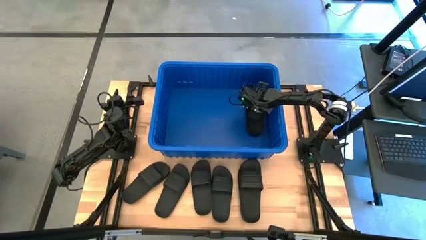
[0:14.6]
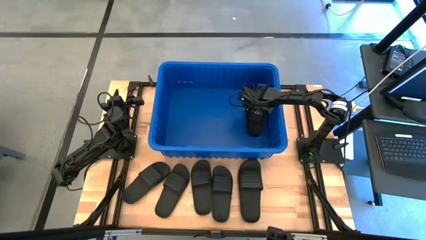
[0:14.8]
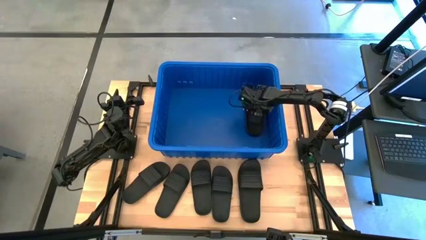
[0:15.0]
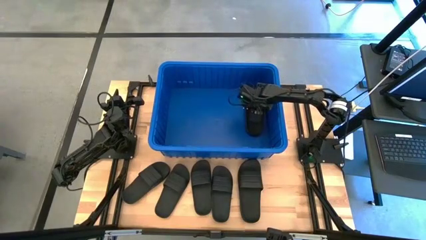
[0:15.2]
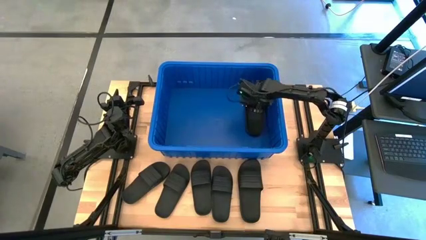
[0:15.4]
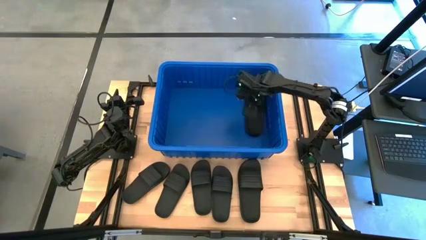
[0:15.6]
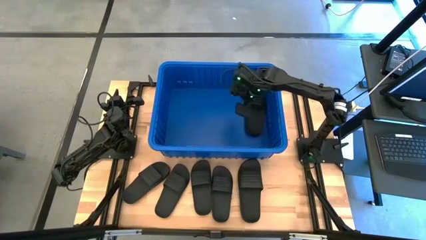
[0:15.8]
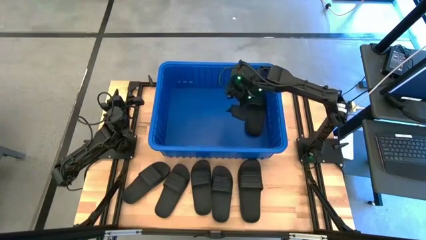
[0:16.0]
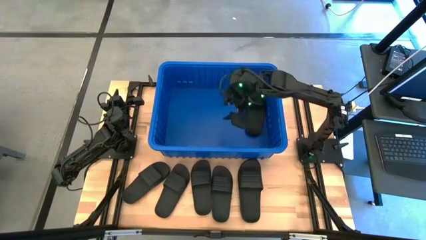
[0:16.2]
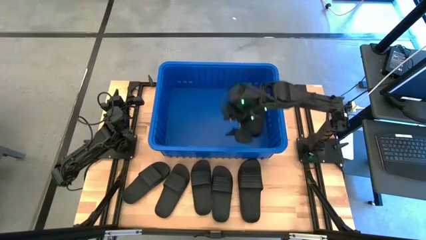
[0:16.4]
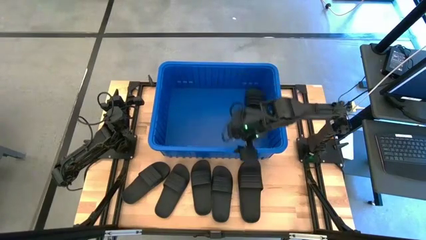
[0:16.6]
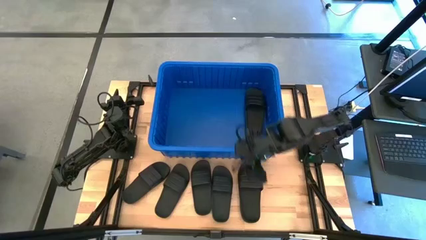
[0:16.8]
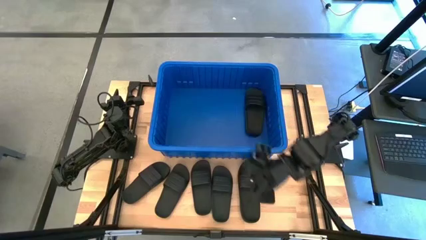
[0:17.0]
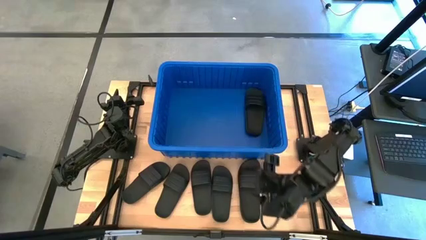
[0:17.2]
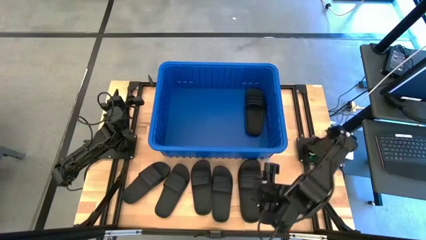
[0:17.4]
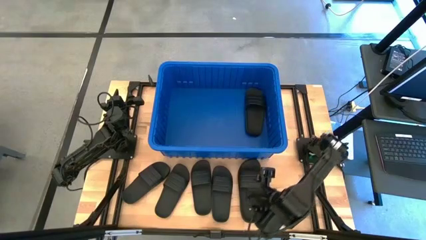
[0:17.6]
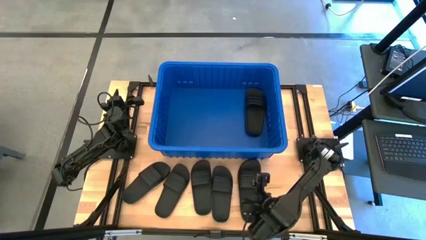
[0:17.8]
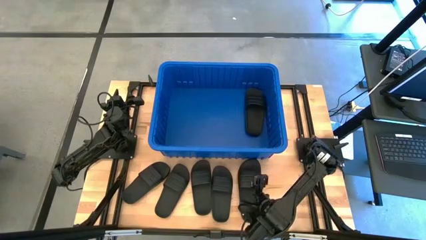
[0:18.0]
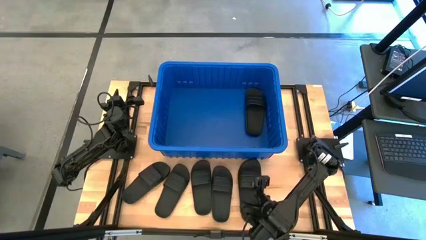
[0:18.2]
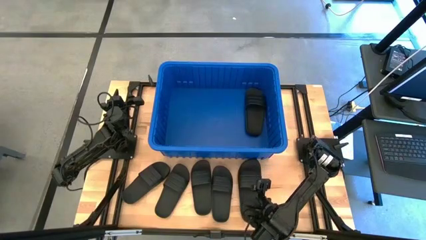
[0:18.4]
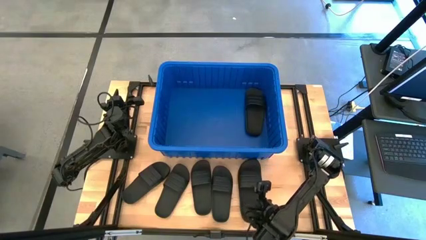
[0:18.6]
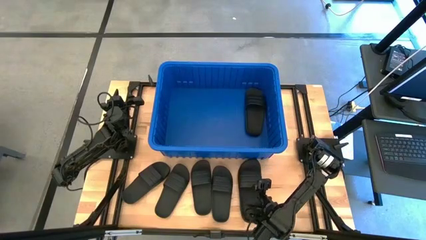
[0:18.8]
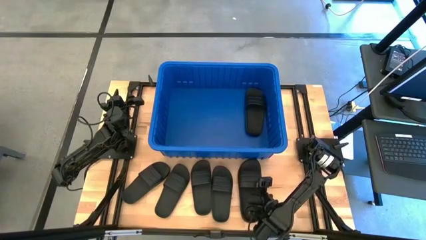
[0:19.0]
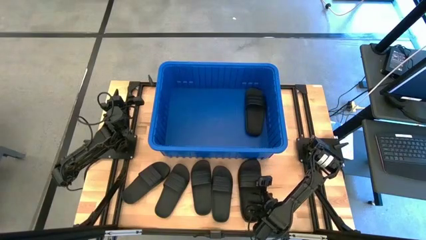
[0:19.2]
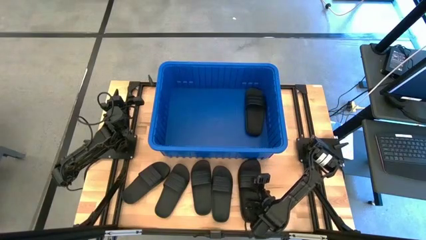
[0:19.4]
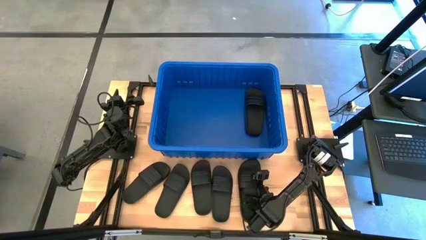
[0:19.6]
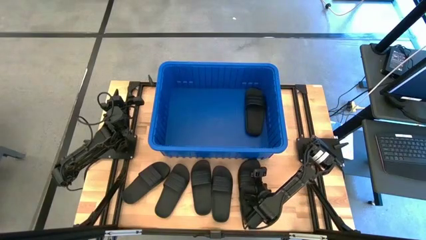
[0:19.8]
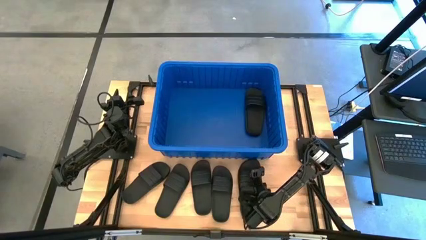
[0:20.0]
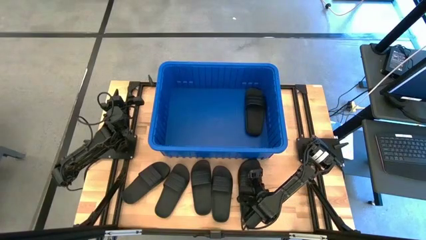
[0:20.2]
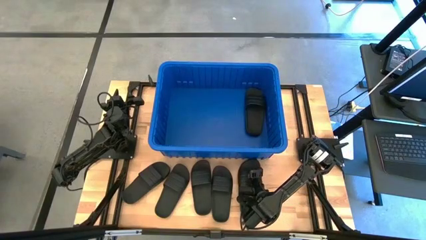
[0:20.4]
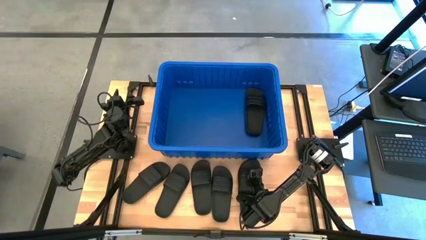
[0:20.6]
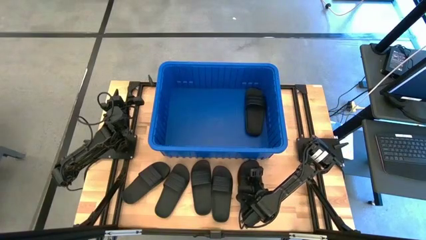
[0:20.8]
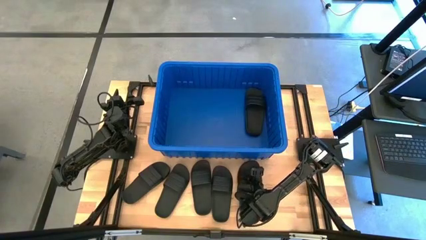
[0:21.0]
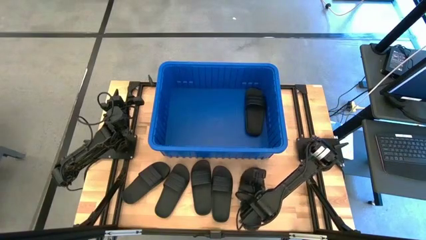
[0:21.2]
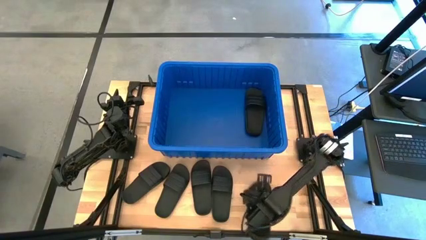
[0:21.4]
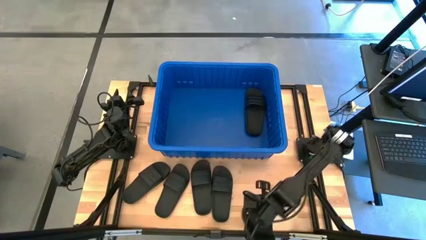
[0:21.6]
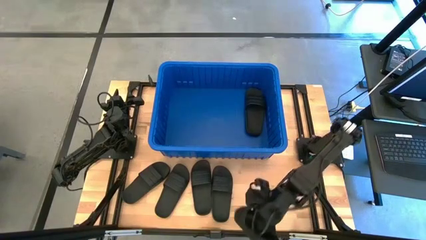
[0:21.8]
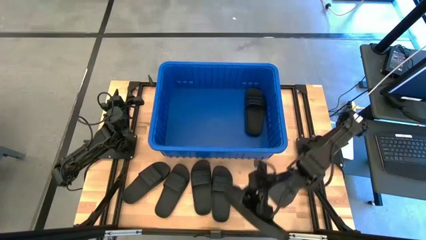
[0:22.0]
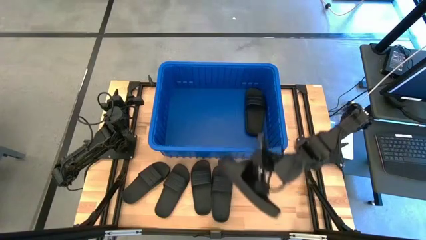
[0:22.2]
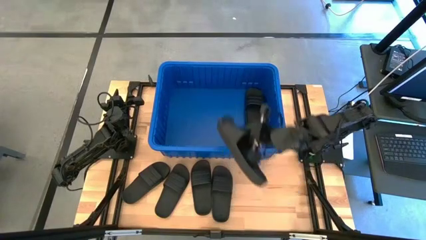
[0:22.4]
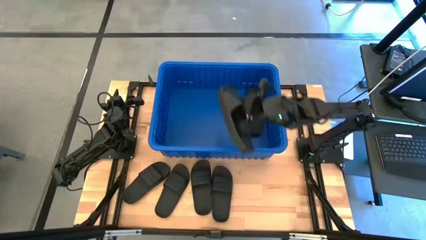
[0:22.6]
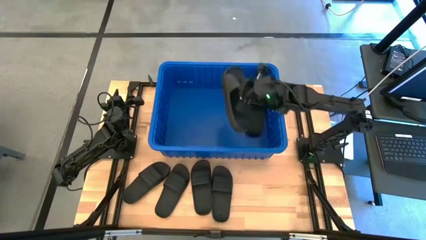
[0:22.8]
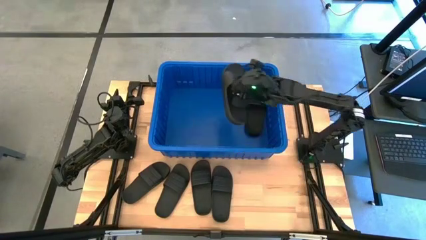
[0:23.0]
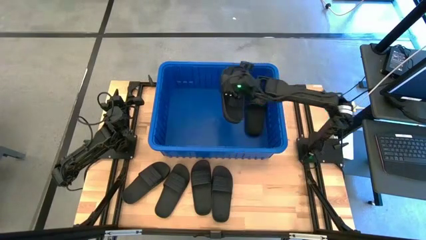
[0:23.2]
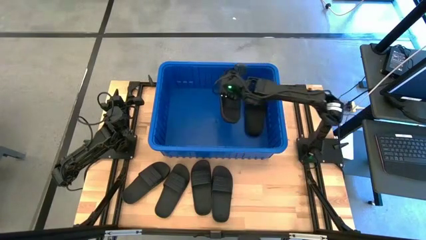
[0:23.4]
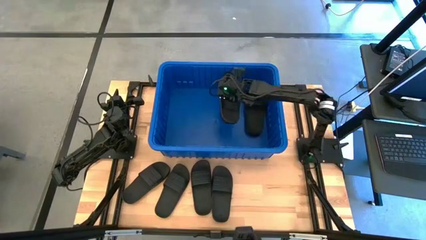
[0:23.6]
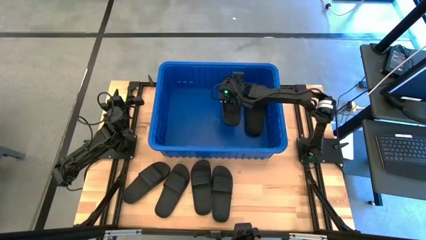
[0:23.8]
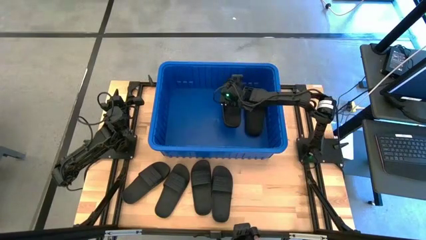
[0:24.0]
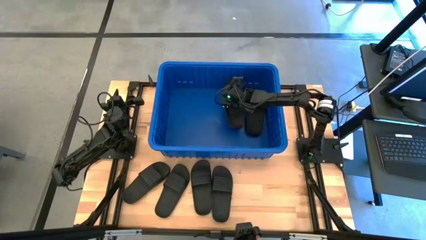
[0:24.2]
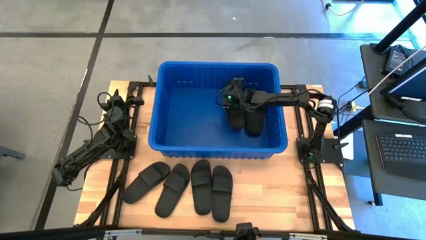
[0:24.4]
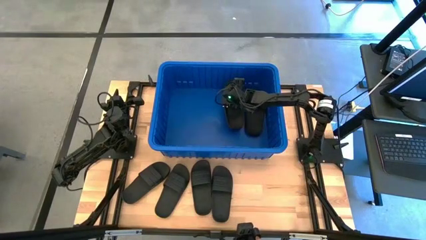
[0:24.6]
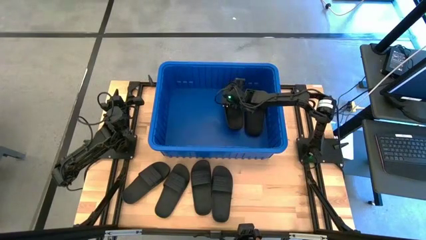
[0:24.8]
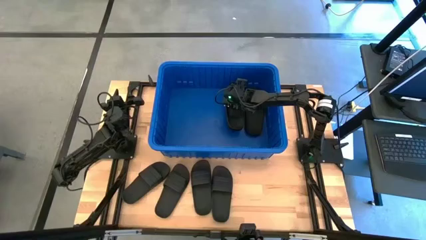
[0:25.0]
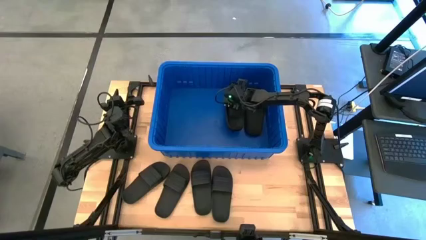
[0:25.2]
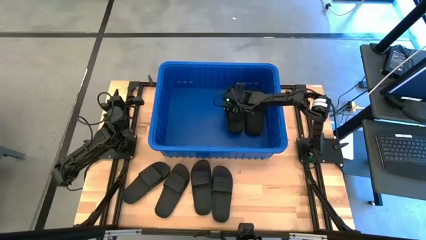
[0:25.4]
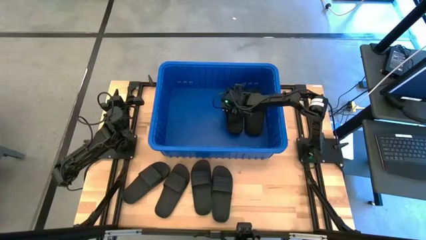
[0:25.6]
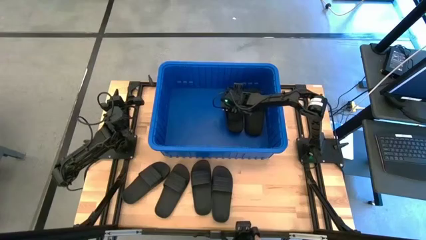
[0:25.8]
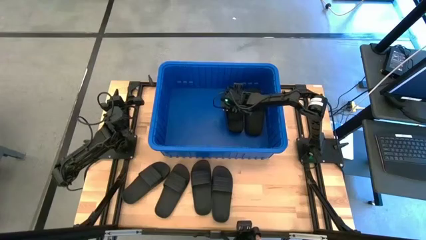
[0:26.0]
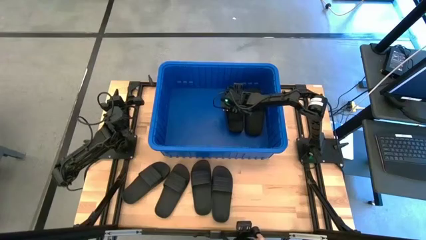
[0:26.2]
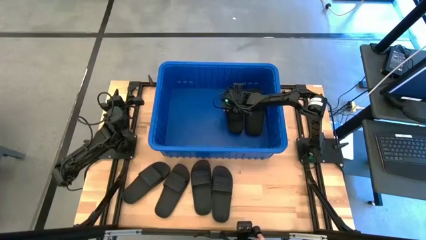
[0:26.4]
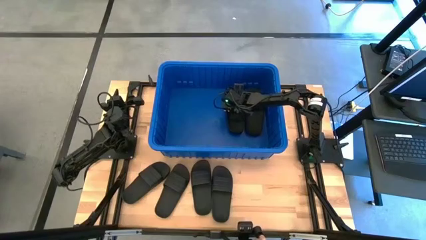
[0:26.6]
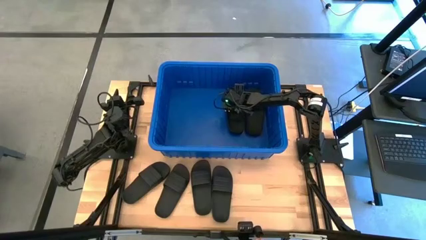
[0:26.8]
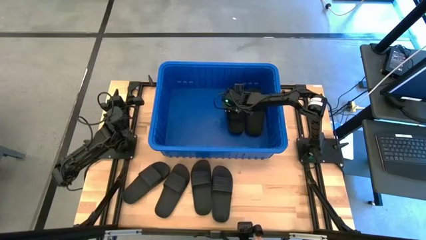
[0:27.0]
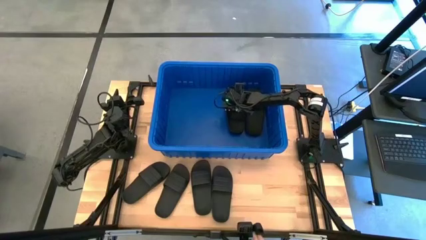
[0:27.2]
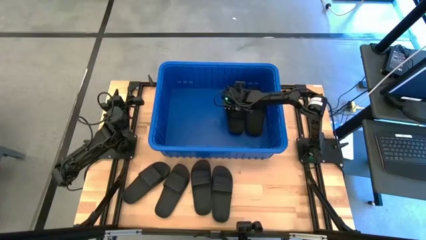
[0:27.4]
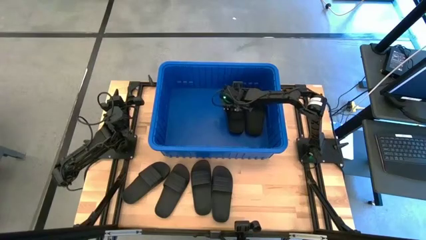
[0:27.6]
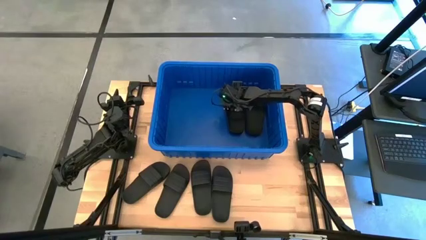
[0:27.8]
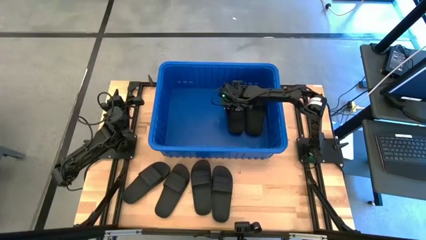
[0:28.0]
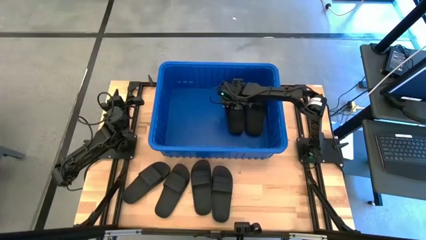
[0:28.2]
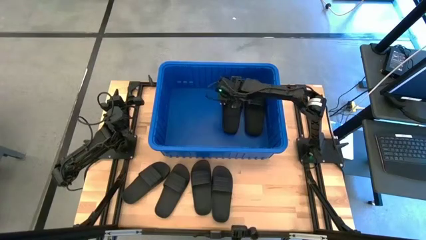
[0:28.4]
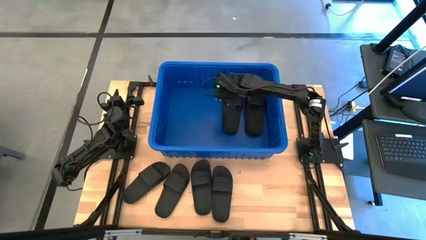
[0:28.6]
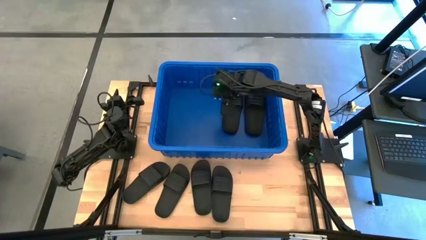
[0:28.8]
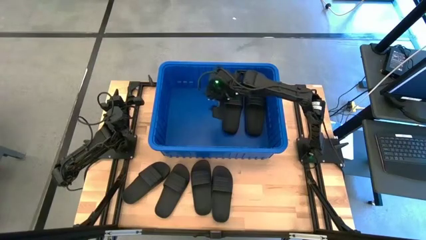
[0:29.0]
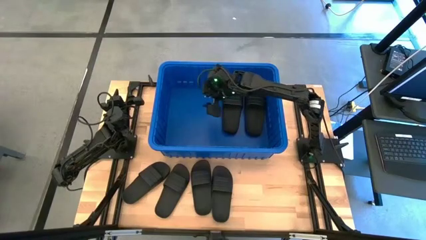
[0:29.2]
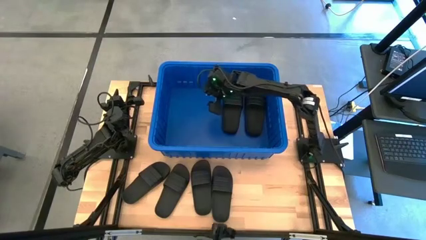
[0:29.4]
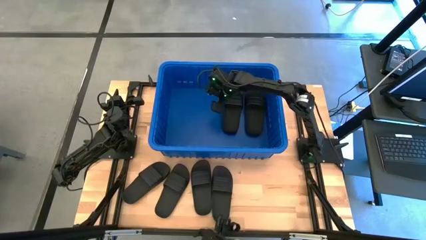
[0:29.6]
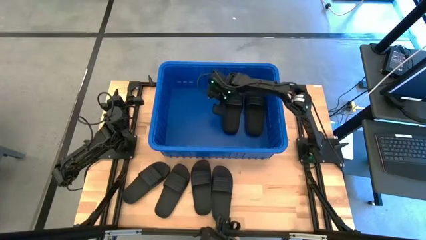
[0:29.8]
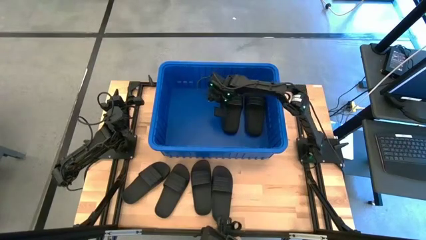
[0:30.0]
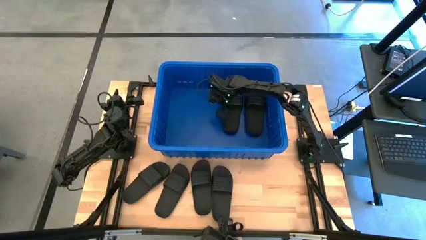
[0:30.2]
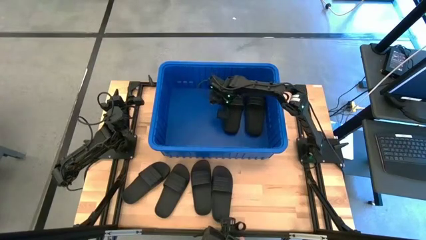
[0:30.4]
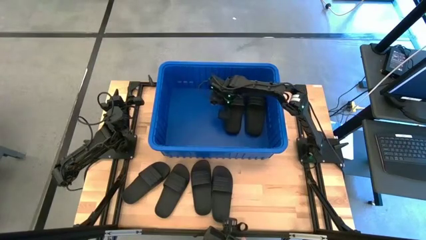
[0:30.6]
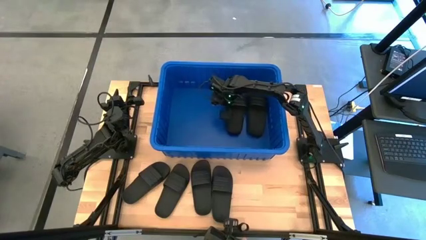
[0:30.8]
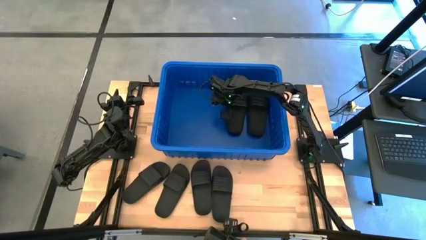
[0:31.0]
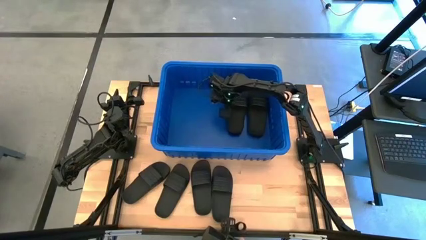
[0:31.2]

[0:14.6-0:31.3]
Task: Pick and place slides into bin
Put the black slide into the blue bin
